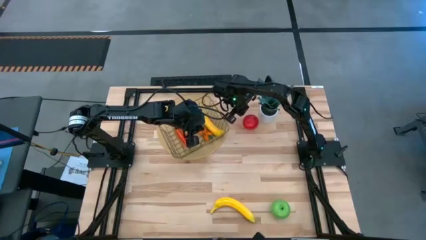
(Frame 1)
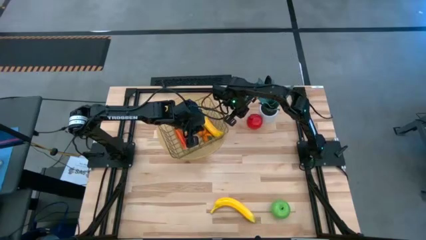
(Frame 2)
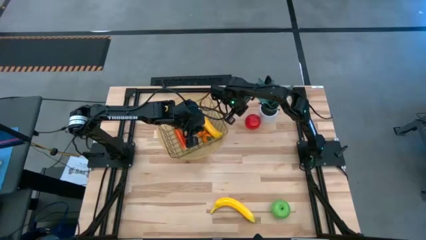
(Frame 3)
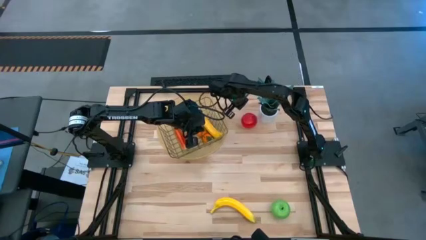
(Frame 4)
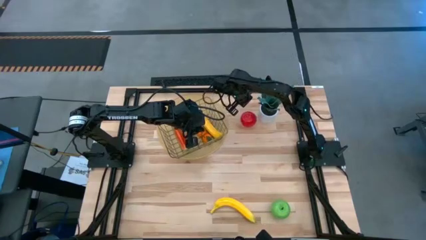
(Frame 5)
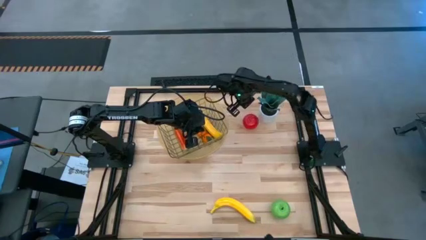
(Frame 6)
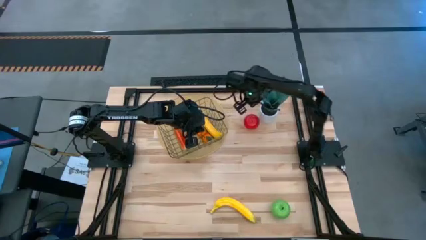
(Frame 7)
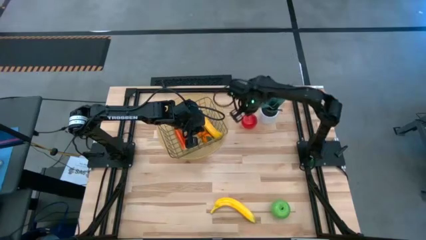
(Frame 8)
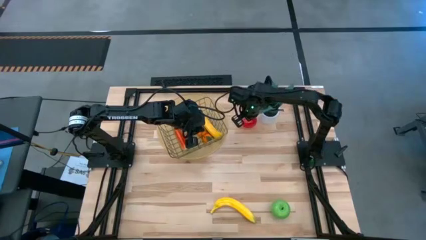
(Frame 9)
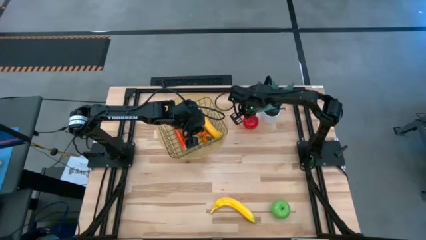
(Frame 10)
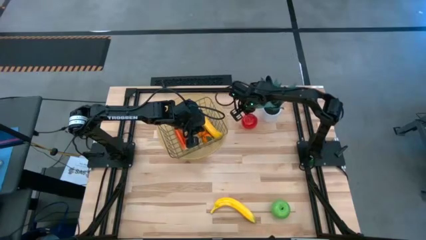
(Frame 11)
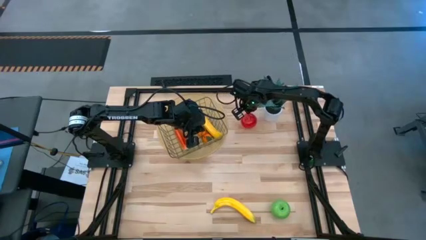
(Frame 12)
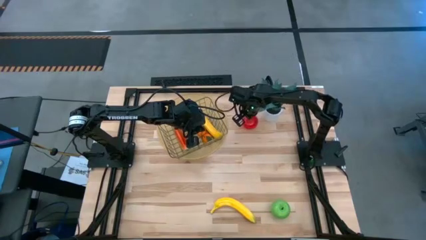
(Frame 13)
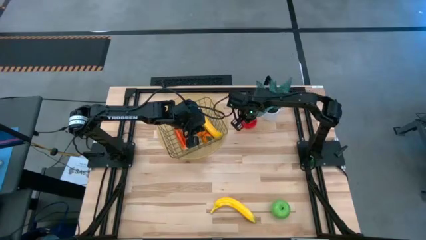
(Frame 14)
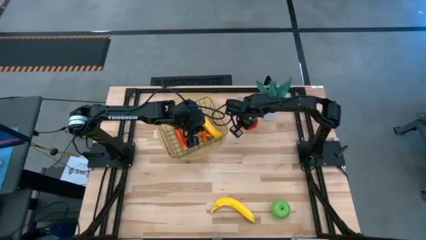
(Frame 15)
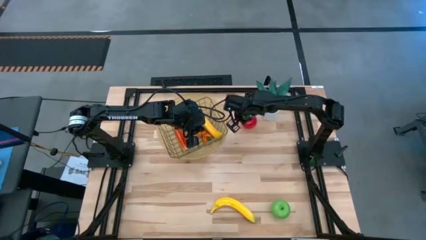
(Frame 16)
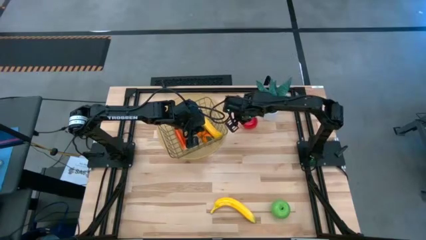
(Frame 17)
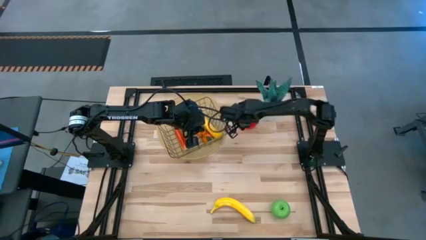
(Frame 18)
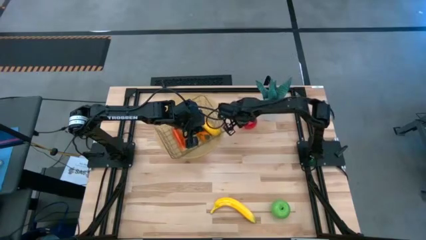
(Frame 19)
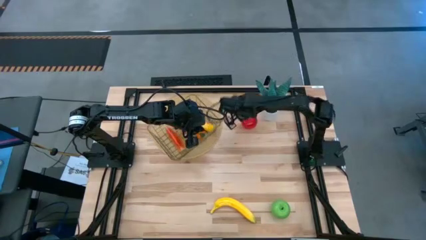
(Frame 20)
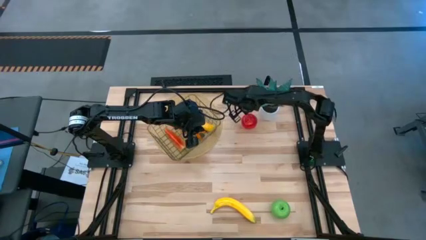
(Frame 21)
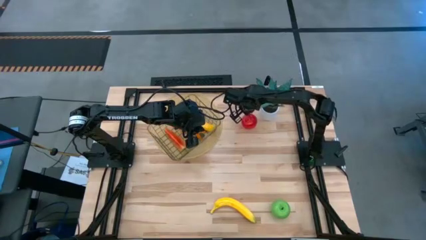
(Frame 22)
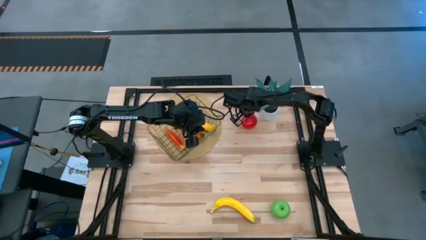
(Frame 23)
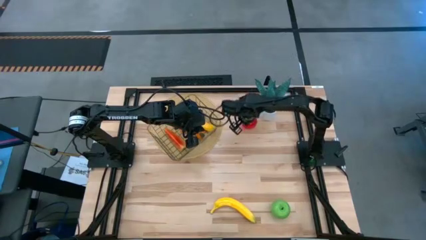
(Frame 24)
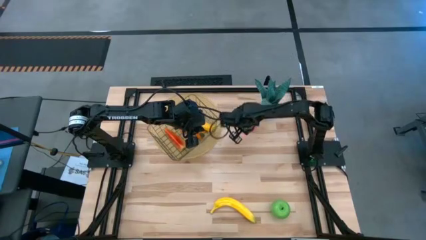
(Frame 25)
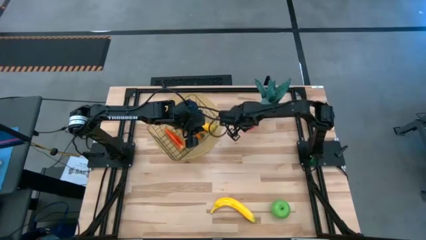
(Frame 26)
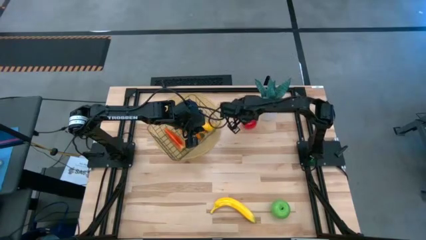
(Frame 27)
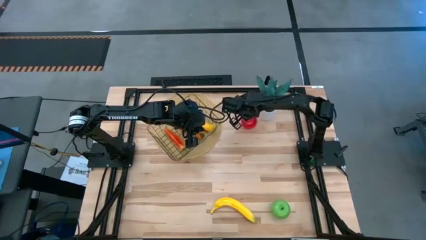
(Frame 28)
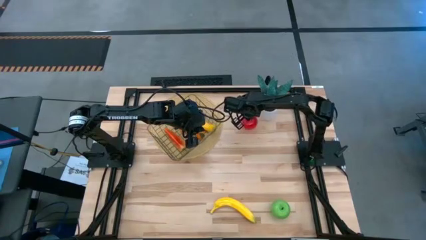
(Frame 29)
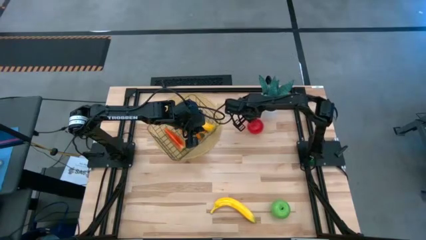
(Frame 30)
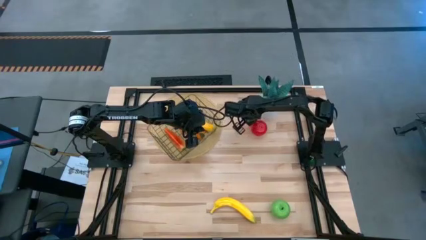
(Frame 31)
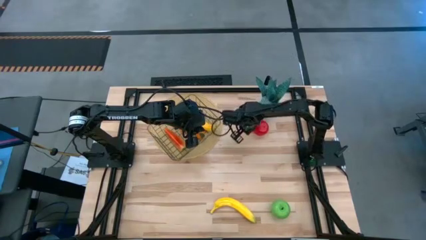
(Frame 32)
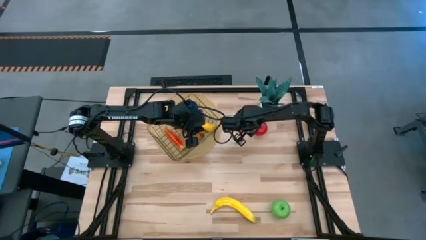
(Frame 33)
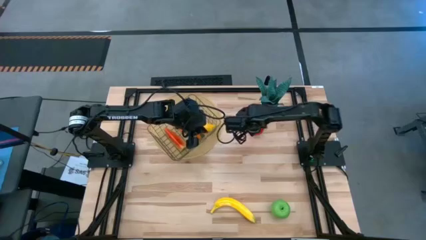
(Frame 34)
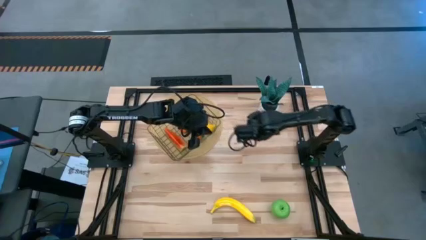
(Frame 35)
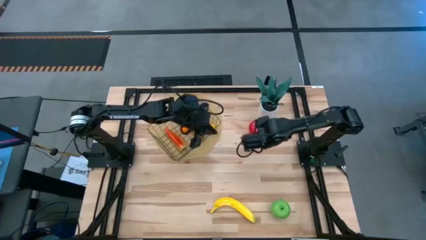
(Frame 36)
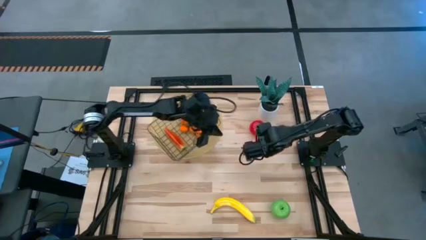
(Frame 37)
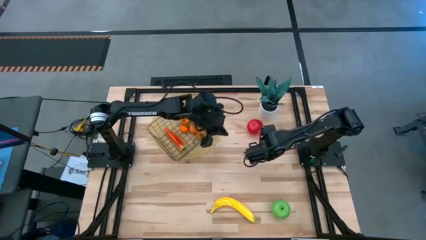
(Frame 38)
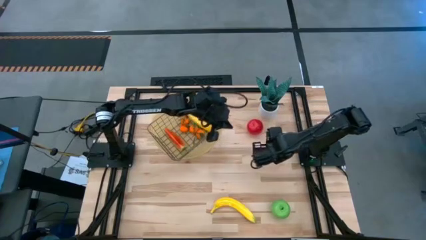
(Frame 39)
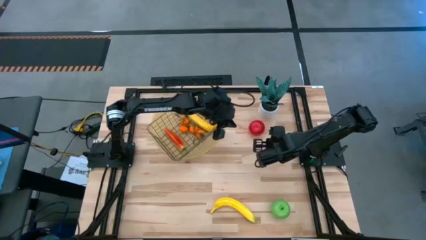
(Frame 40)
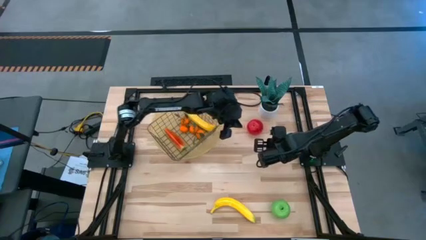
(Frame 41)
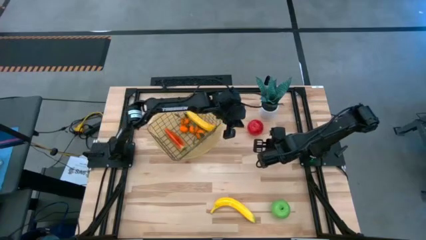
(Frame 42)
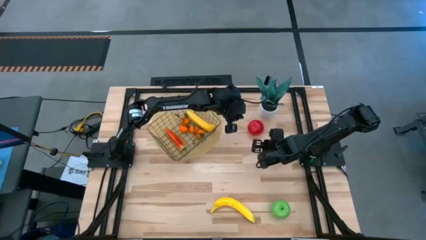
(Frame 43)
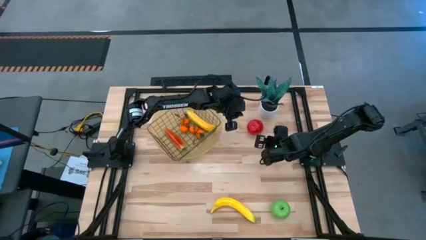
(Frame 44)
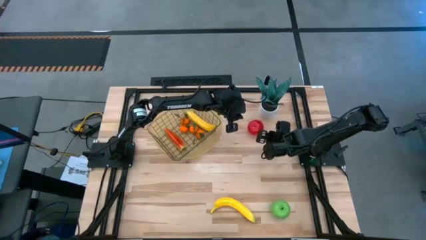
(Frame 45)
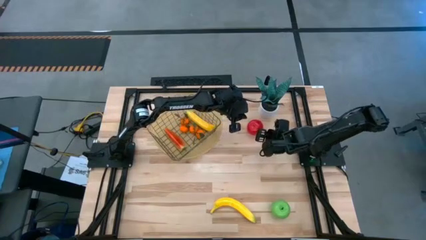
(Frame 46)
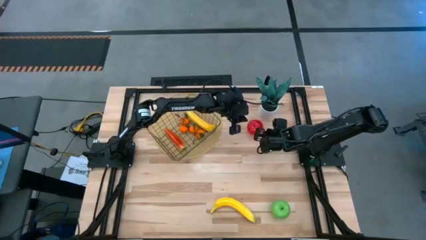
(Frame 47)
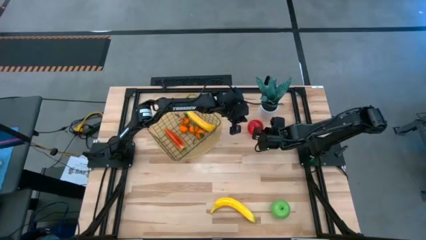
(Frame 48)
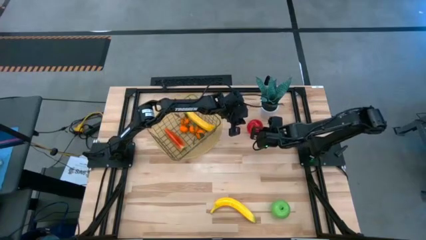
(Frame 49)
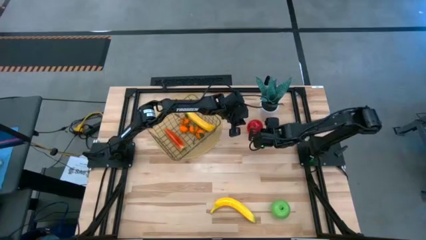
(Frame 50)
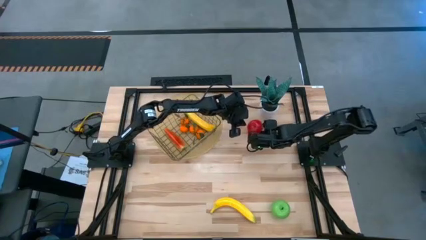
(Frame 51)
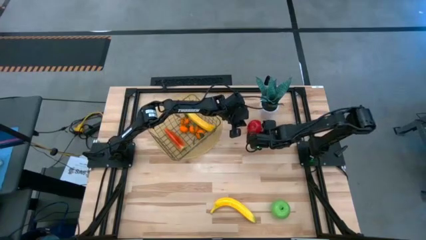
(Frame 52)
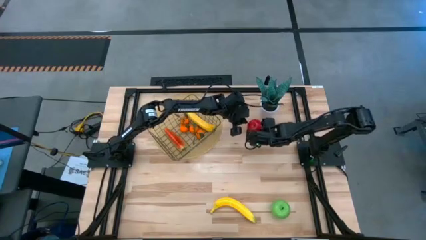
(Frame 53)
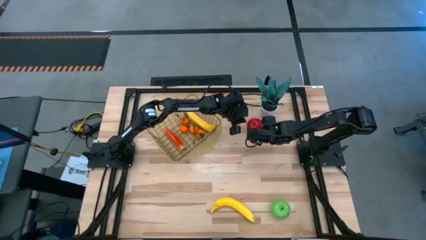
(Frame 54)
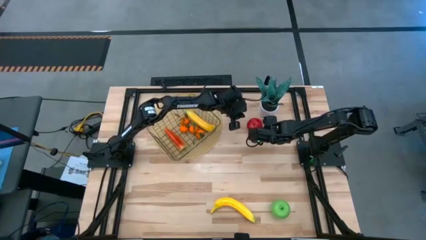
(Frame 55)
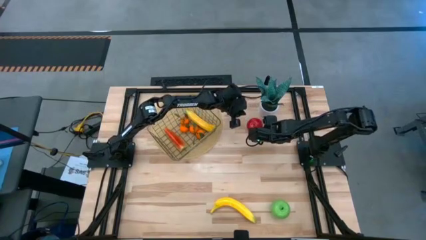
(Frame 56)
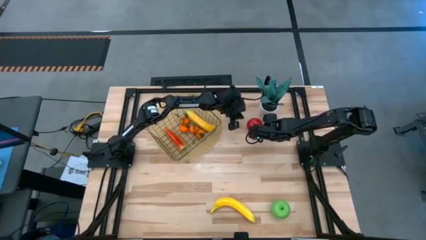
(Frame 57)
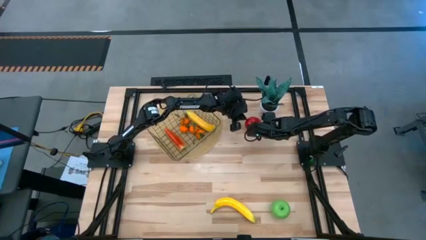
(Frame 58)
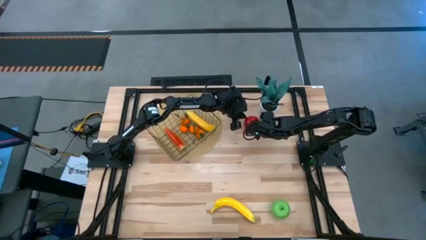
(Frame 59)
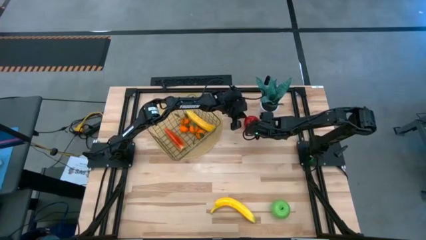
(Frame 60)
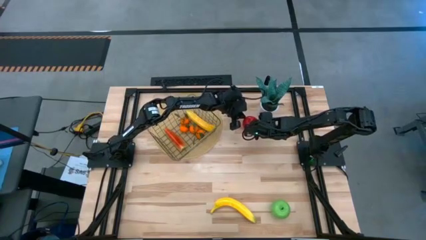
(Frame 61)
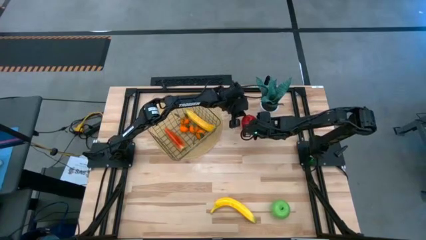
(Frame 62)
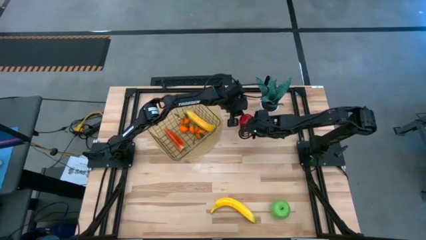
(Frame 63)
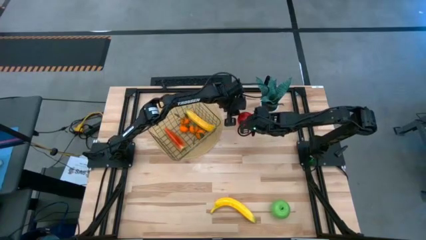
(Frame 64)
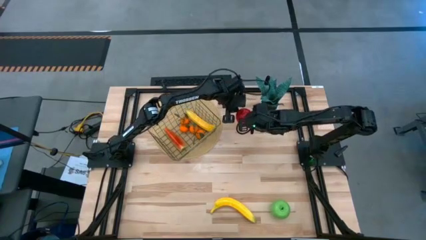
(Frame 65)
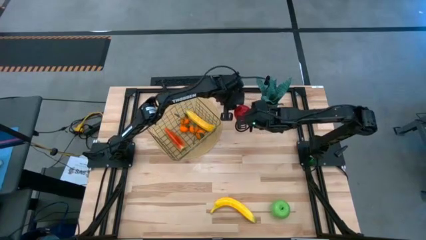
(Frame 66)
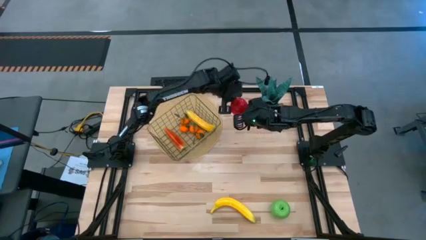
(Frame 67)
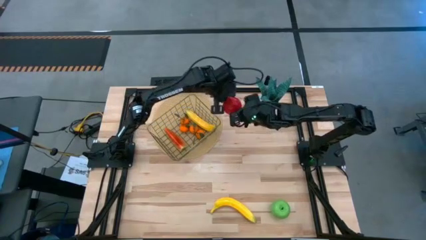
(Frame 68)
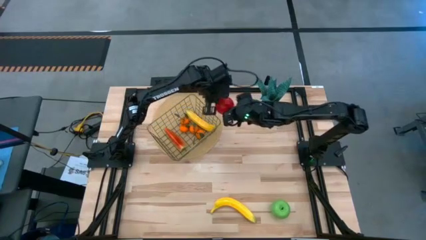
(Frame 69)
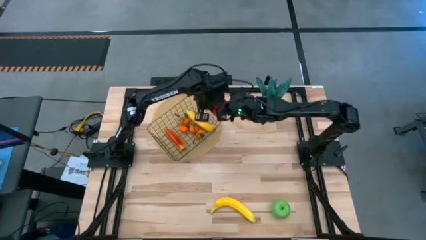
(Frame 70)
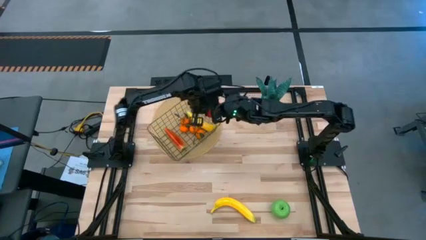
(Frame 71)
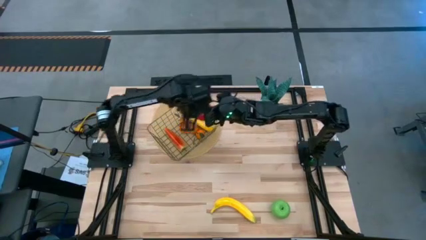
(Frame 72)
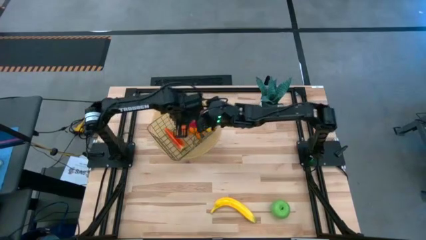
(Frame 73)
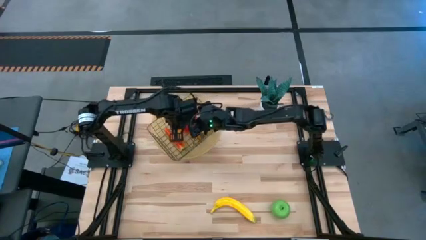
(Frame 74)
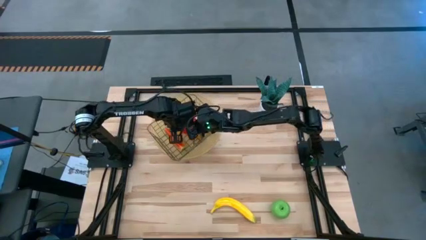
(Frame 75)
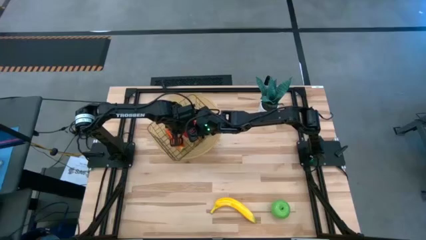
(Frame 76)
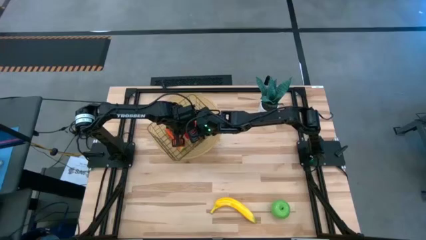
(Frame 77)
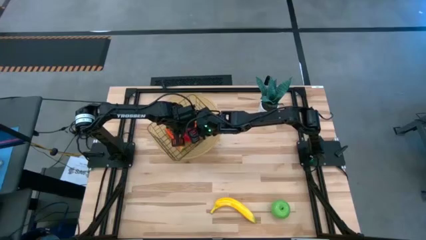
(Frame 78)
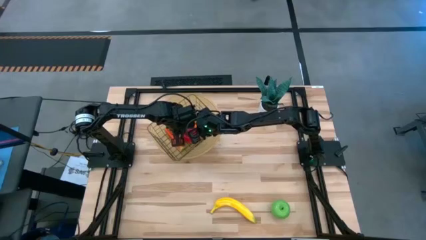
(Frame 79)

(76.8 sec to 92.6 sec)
Task: Build produce basket
Put the red apple into the wire basket
